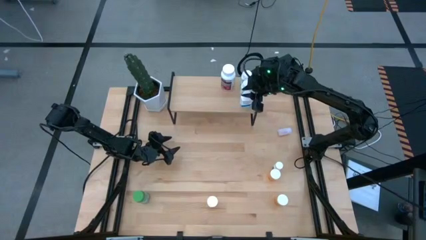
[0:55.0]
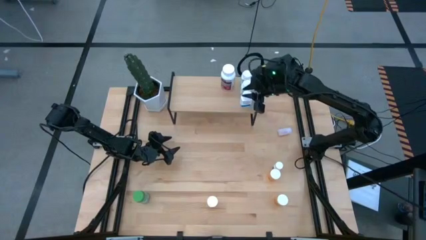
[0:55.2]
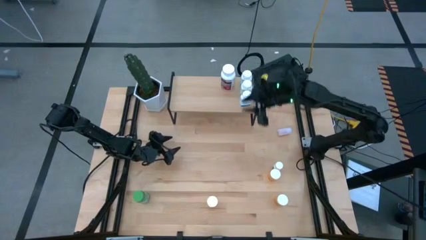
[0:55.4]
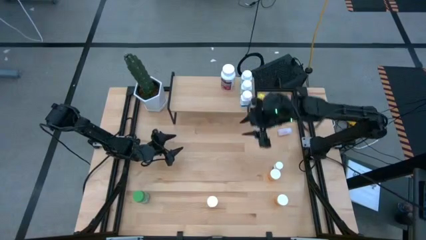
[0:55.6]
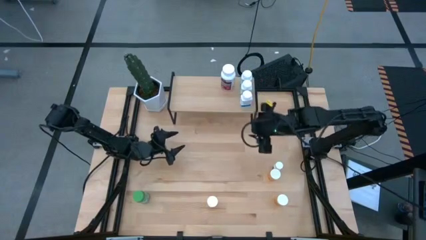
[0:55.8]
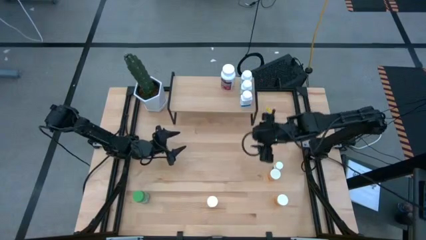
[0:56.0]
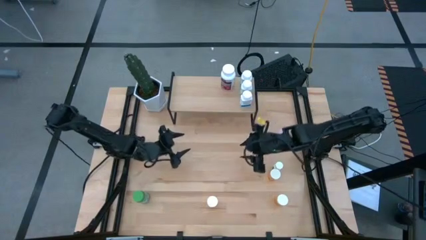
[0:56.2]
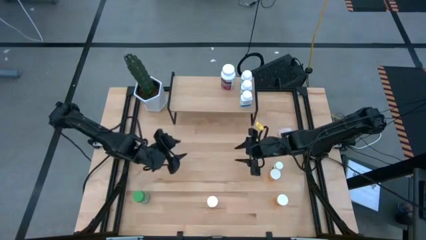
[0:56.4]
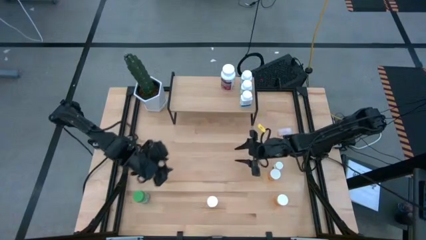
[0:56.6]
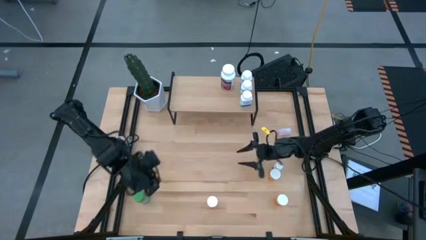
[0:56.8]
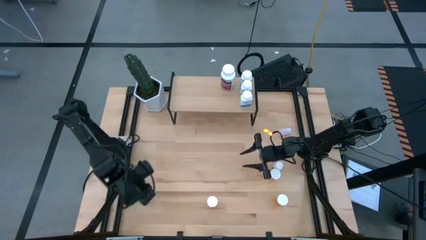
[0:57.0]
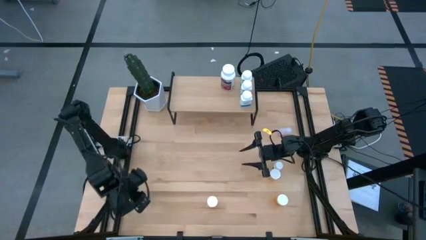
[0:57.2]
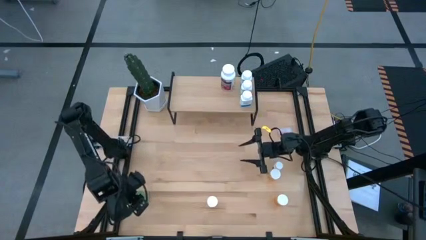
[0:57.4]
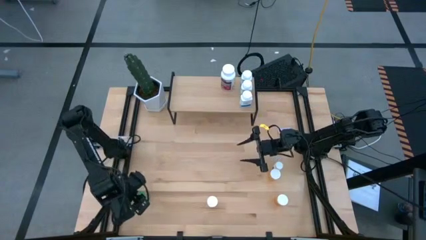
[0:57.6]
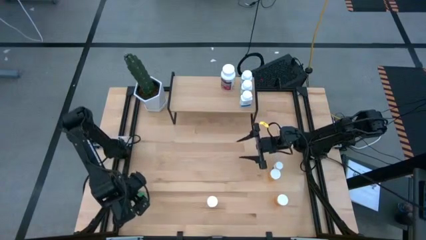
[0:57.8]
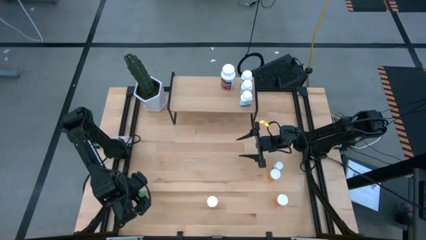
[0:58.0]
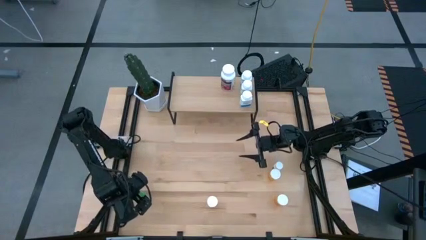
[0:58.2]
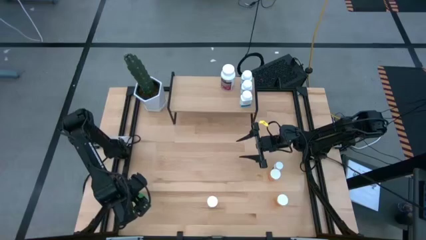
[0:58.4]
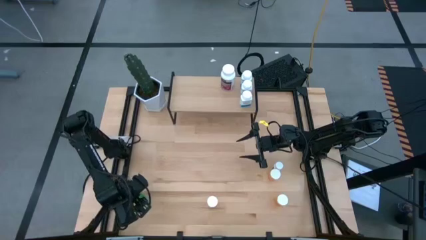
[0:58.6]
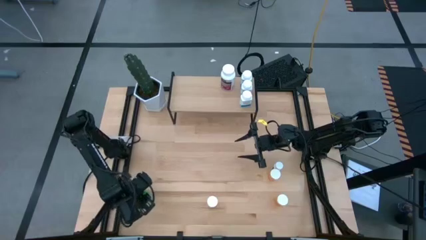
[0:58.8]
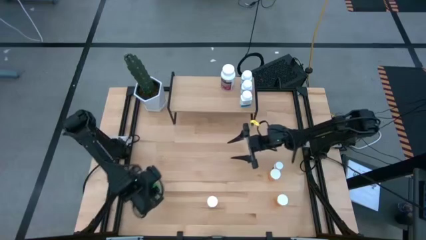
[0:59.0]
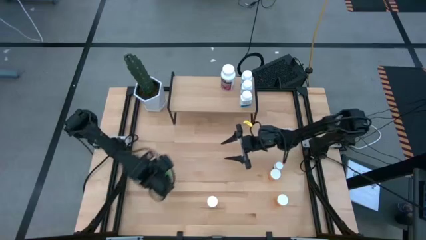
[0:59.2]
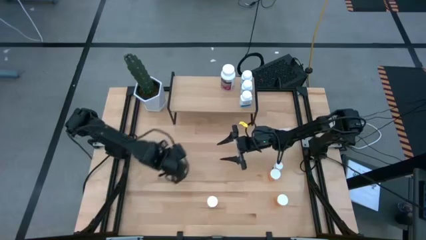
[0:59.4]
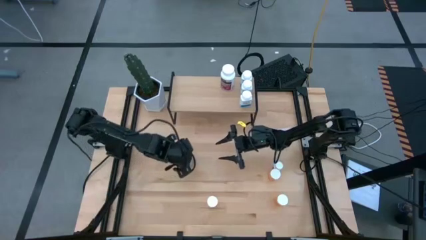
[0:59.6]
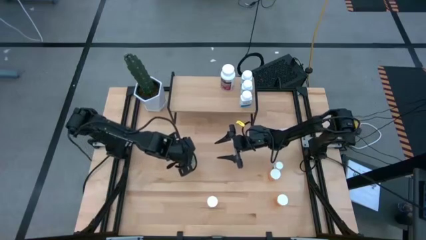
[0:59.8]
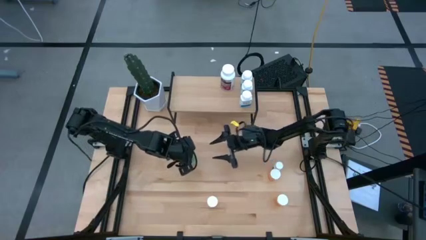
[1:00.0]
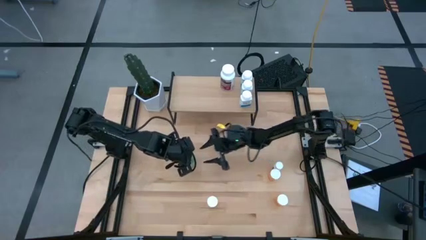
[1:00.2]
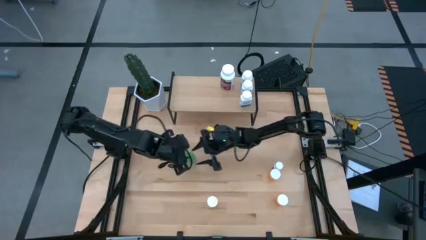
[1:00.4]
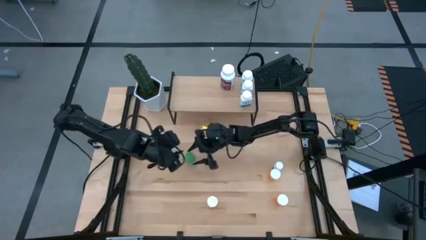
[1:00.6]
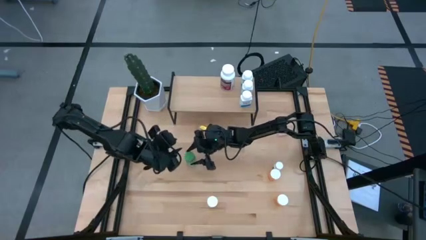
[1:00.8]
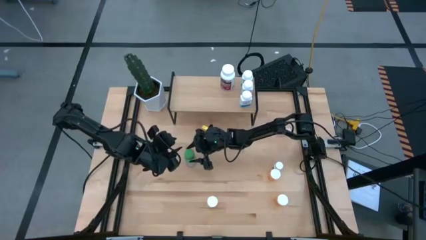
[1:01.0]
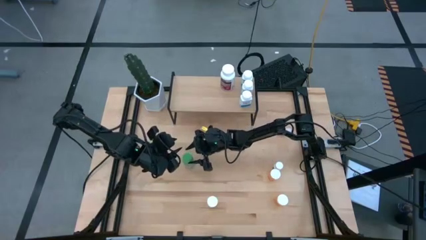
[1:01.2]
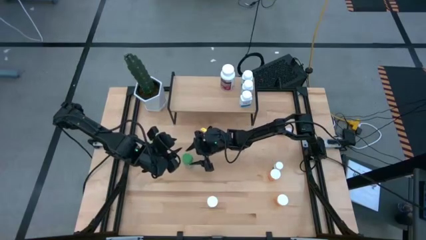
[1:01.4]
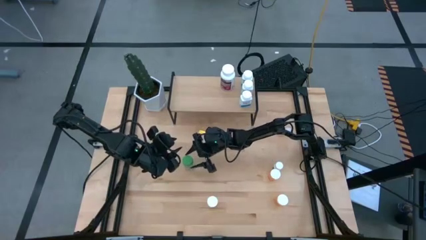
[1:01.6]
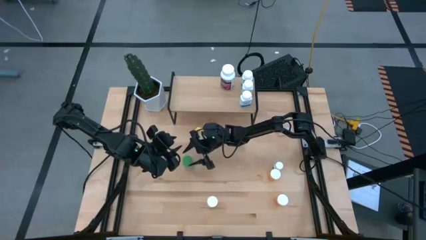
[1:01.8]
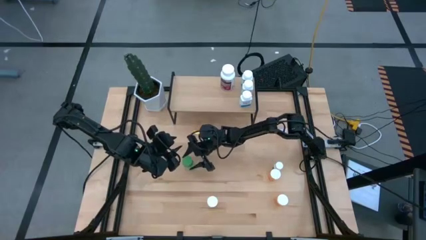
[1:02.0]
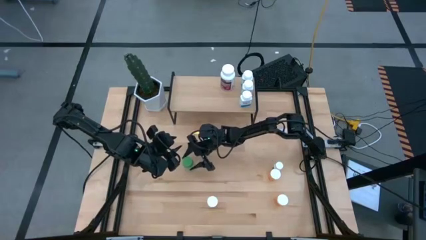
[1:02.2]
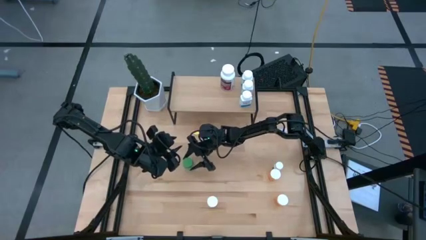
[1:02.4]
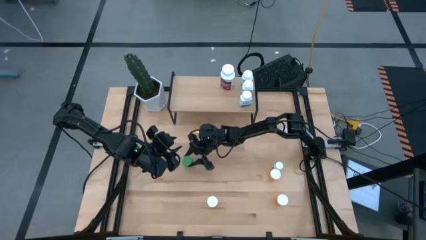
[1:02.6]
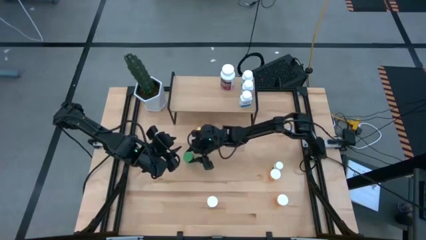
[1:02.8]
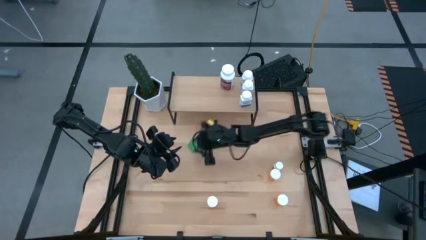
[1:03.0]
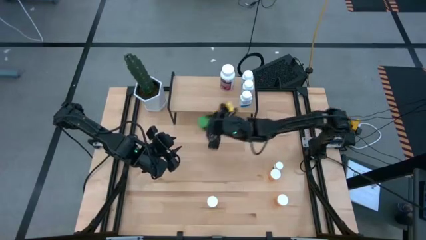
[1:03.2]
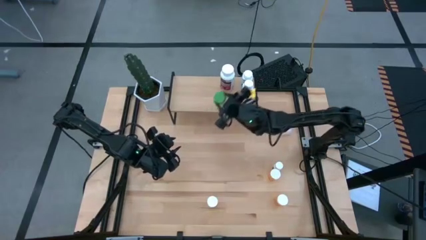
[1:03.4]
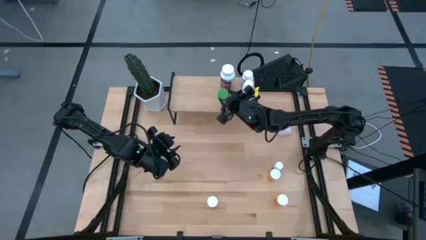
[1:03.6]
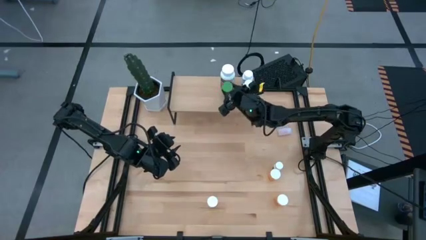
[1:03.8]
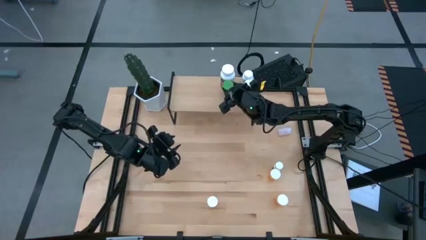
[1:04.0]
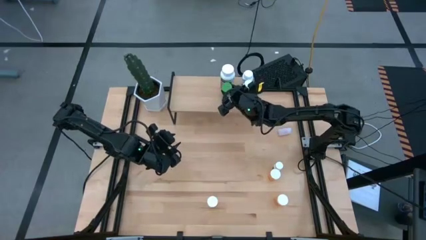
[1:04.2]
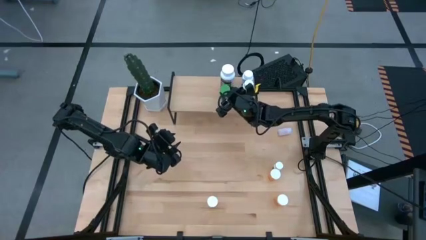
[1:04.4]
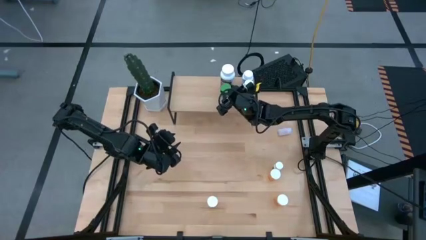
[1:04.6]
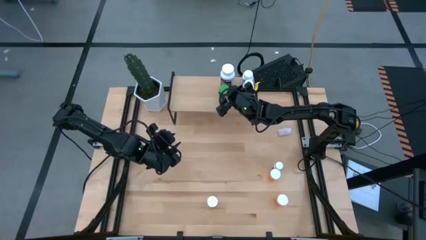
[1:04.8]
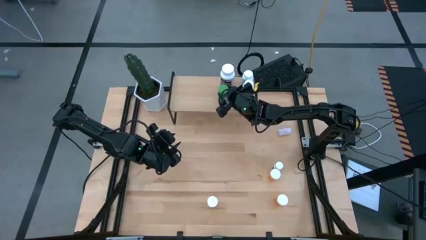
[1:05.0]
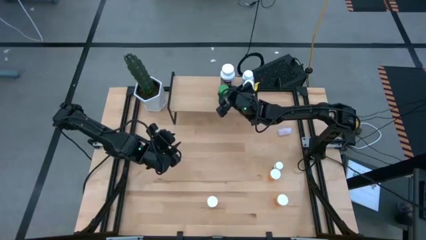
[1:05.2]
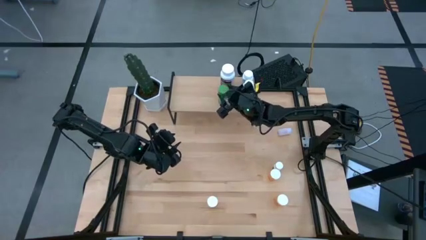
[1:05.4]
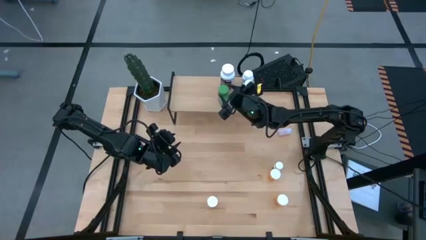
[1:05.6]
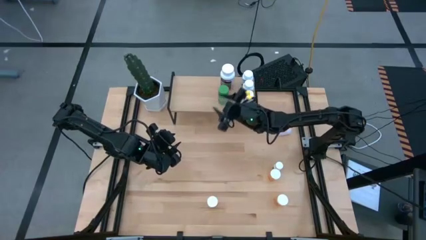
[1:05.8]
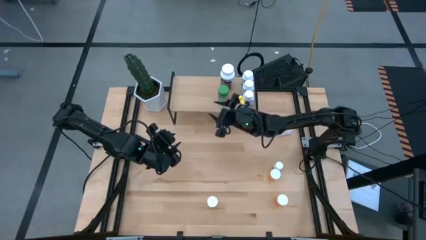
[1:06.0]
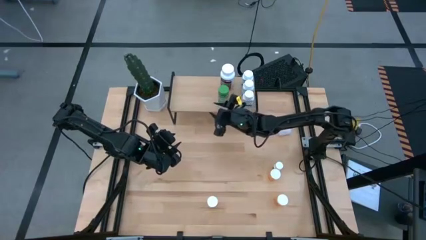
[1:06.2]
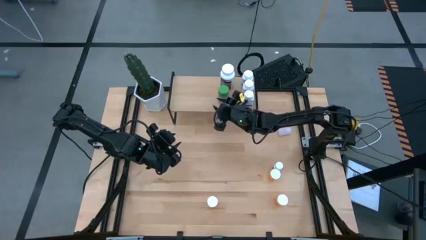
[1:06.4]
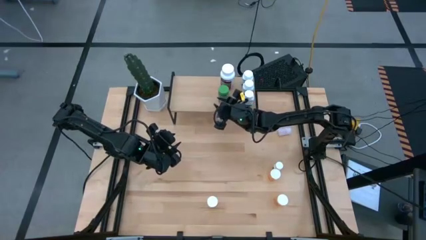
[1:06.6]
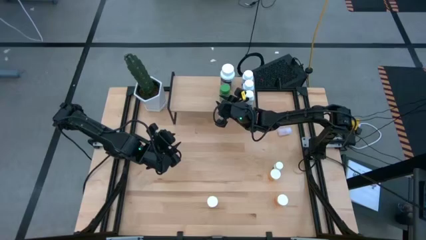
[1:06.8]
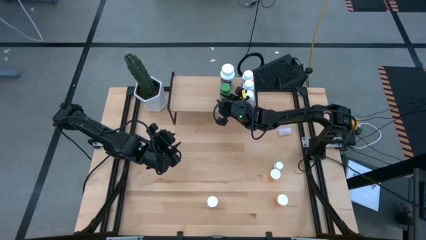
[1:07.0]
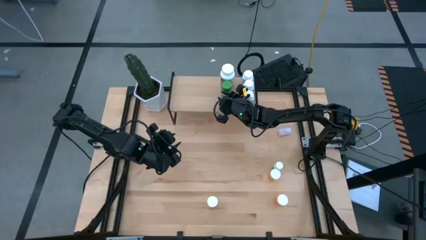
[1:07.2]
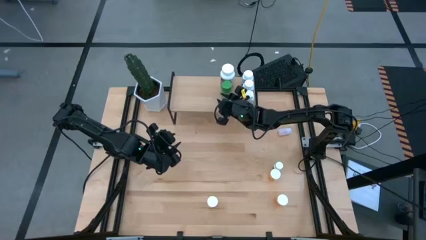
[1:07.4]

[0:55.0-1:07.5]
Task: Pick and place medicine bottles onto shelf by color
Put the green pill bottle on the shelf

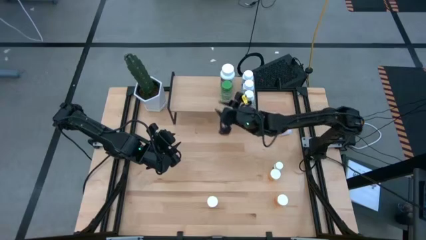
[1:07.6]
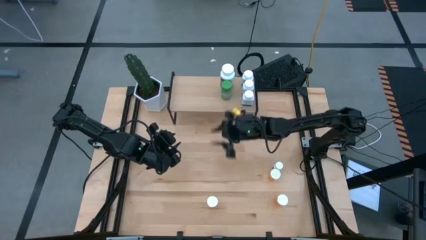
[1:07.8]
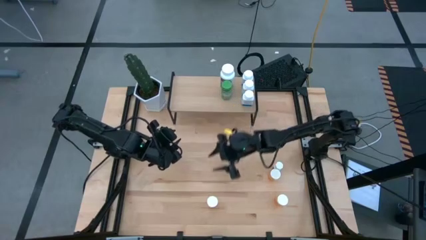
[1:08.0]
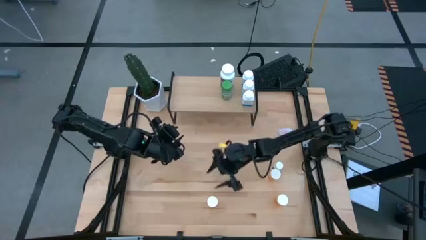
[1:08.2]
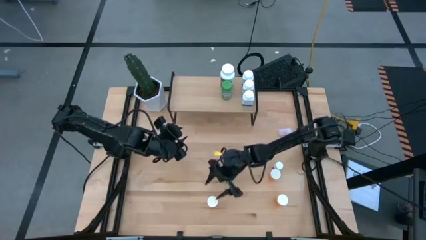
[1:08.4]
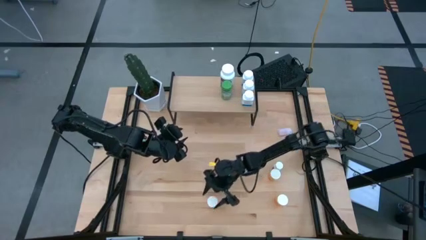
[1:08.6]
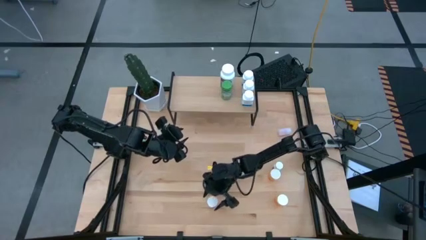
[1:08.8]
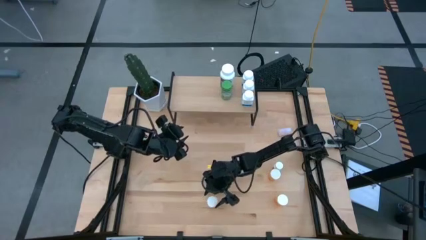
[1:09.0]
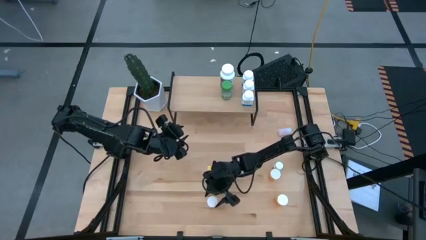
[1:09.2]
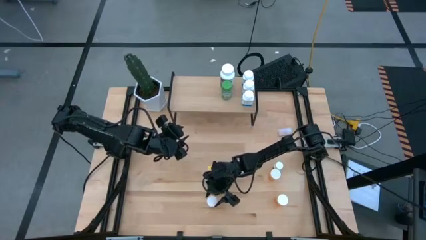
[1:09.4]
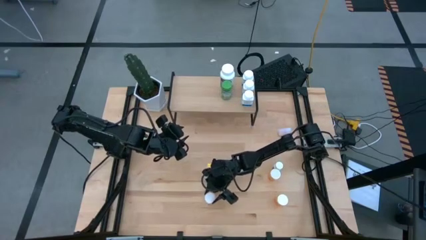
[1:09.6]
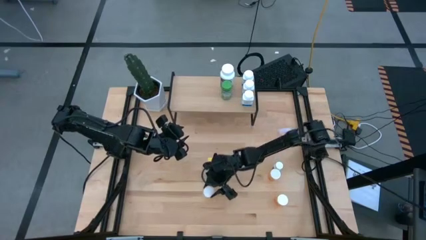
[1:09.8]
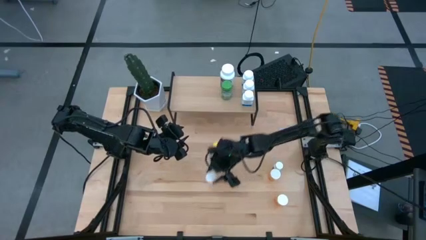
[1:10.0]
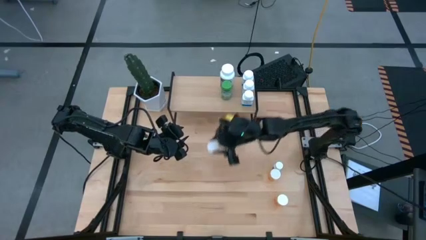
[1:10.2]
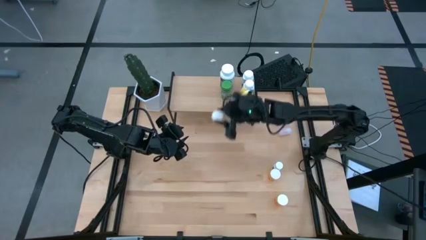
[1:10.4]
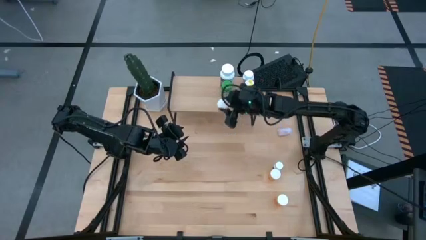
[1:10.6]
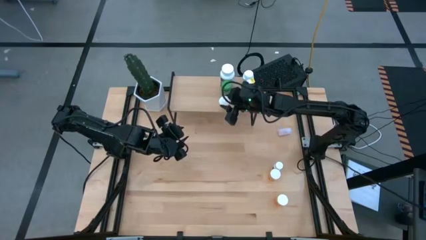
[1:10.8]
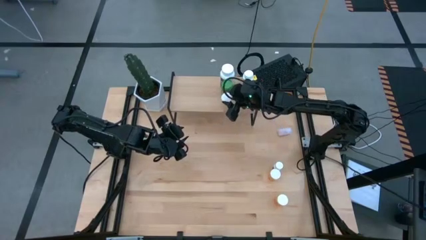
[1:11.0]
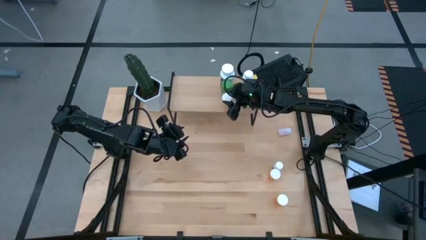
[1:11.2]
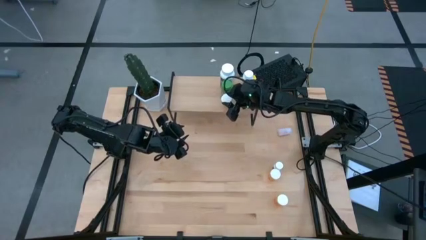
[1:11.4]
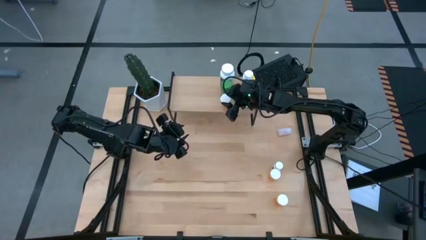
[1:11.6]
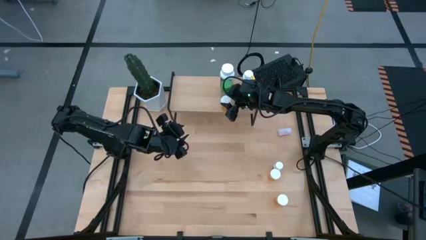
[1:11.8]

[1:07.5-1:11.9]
Put the left orange capsule bottle on the shelf
